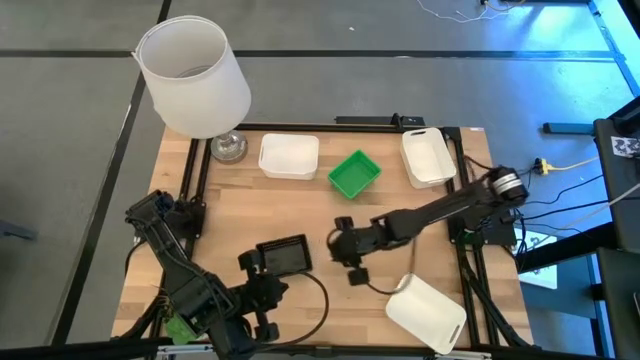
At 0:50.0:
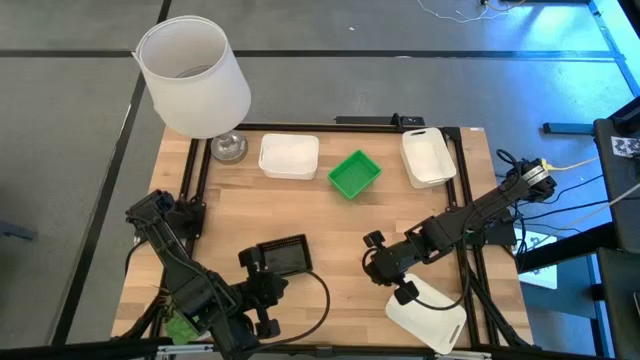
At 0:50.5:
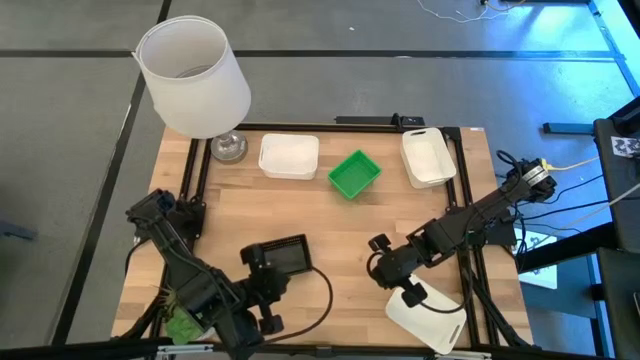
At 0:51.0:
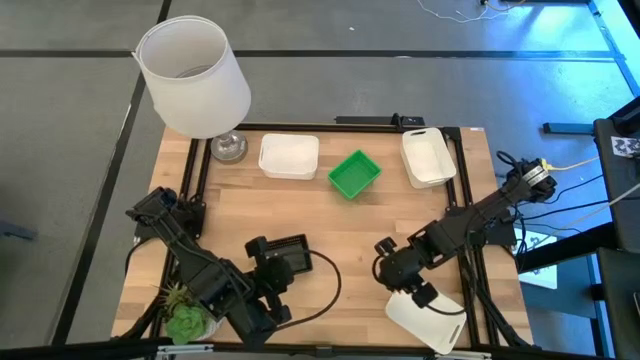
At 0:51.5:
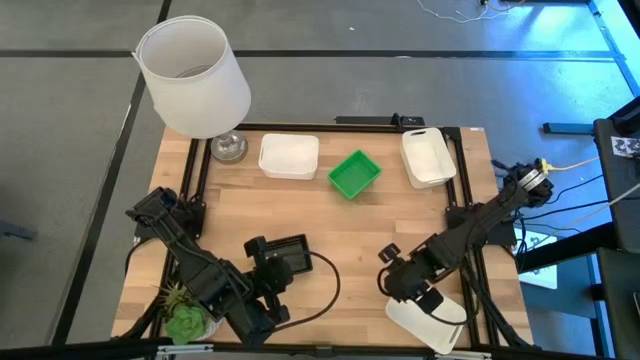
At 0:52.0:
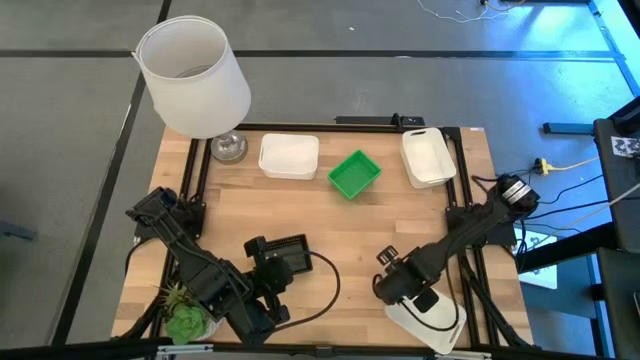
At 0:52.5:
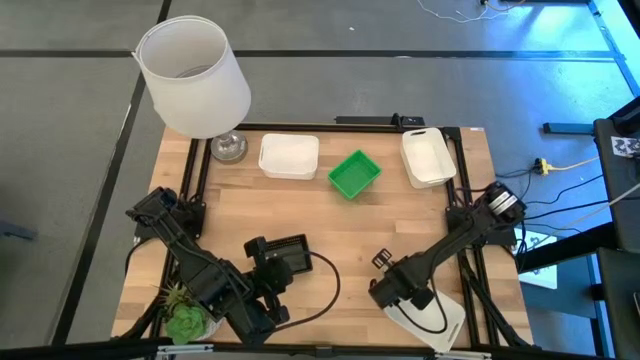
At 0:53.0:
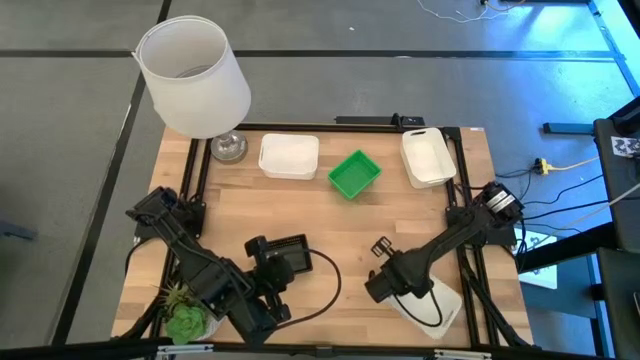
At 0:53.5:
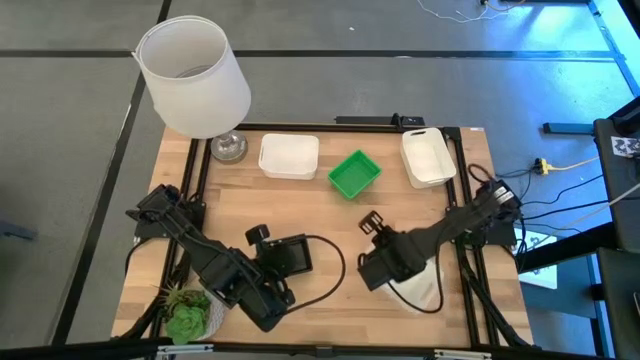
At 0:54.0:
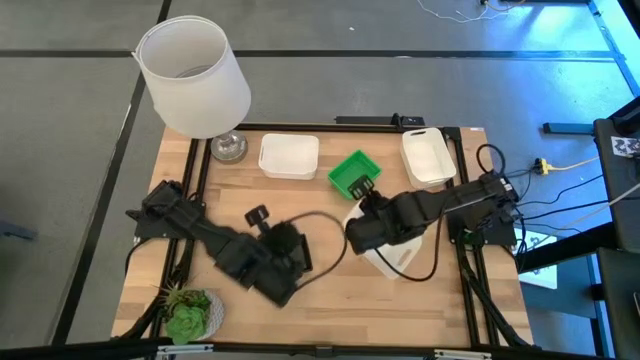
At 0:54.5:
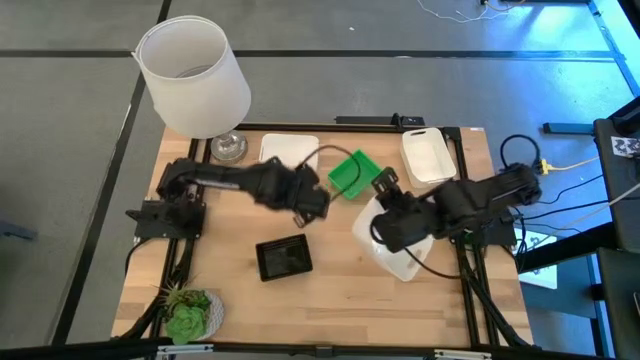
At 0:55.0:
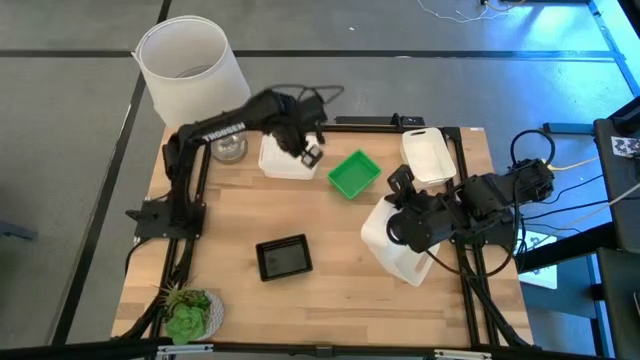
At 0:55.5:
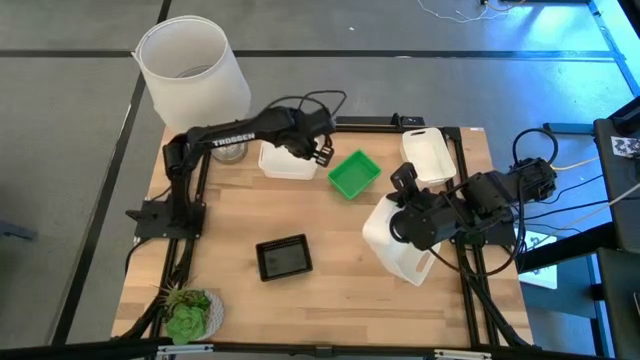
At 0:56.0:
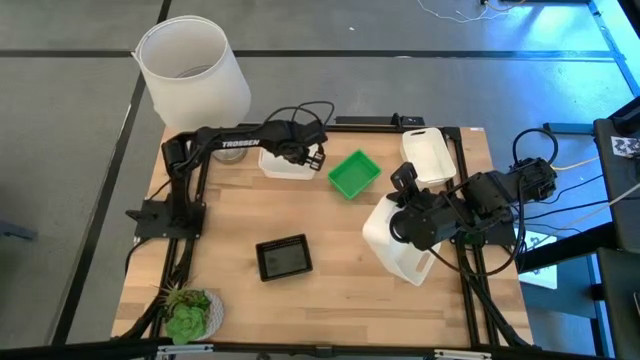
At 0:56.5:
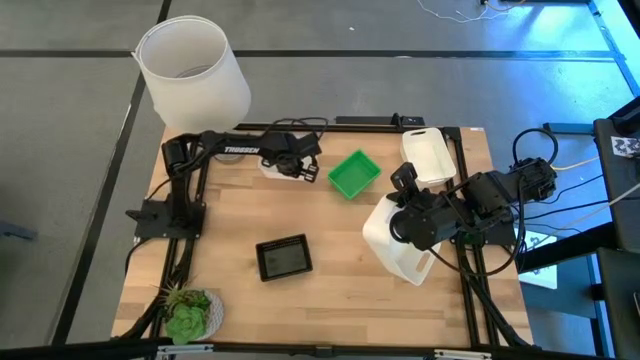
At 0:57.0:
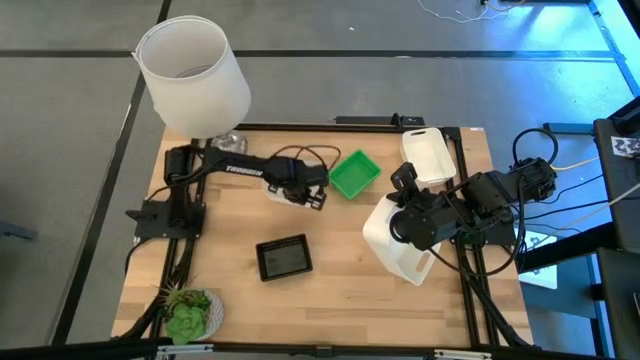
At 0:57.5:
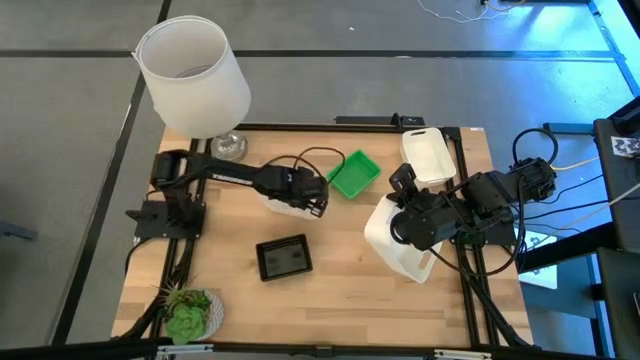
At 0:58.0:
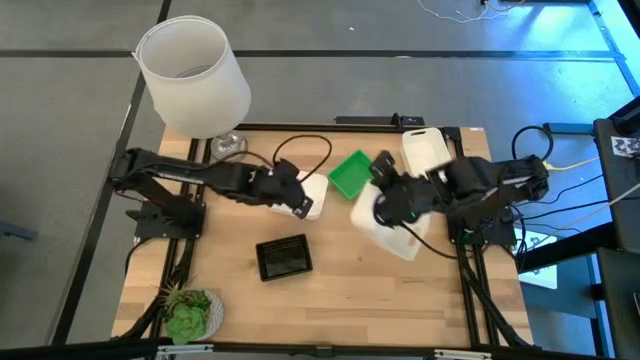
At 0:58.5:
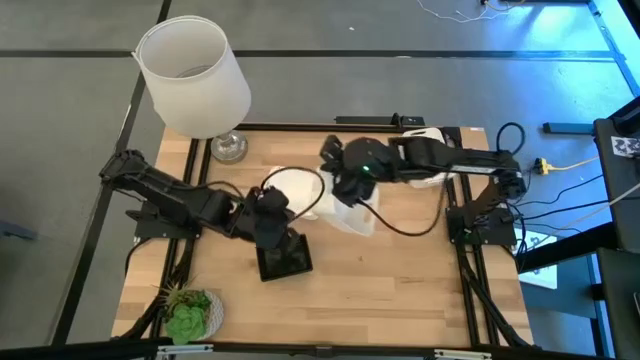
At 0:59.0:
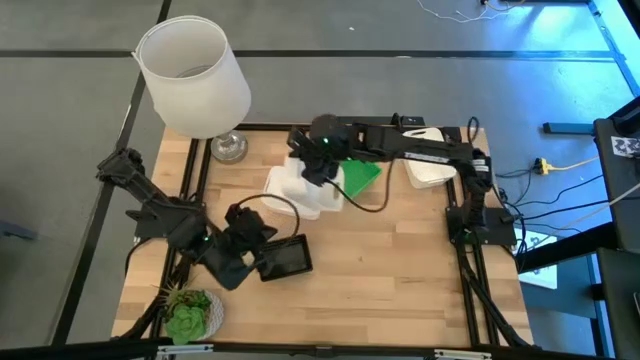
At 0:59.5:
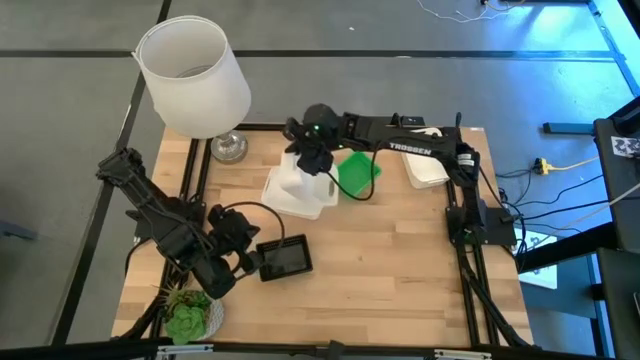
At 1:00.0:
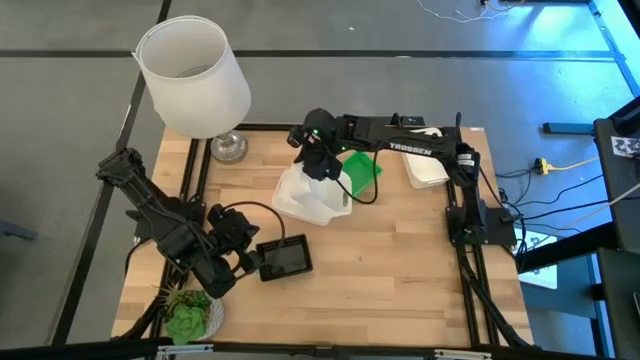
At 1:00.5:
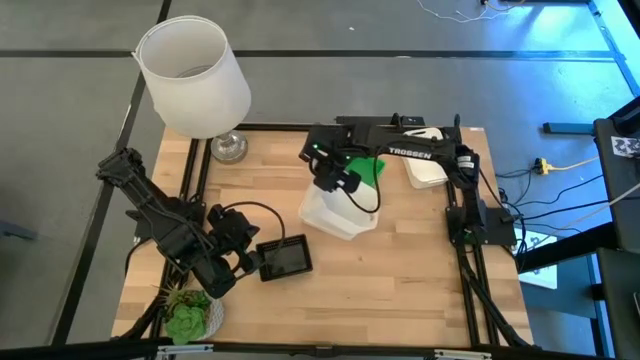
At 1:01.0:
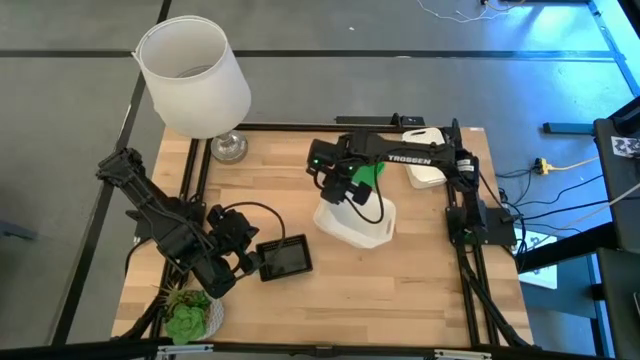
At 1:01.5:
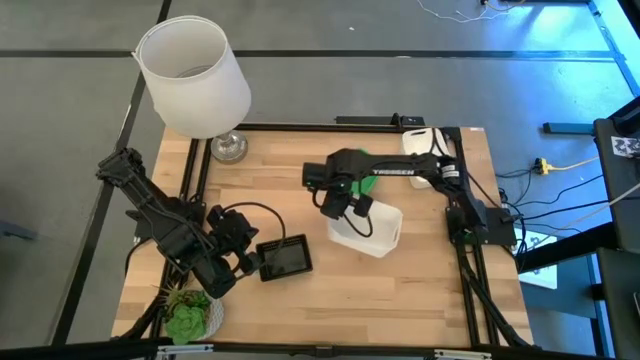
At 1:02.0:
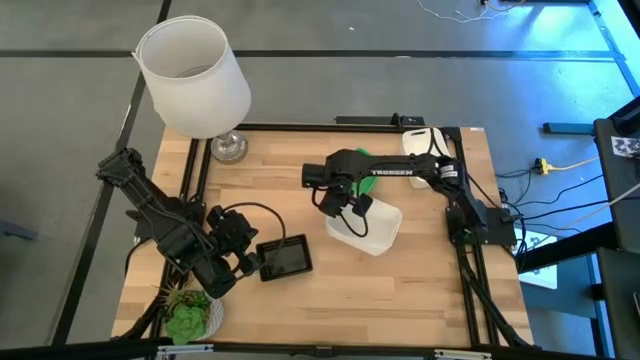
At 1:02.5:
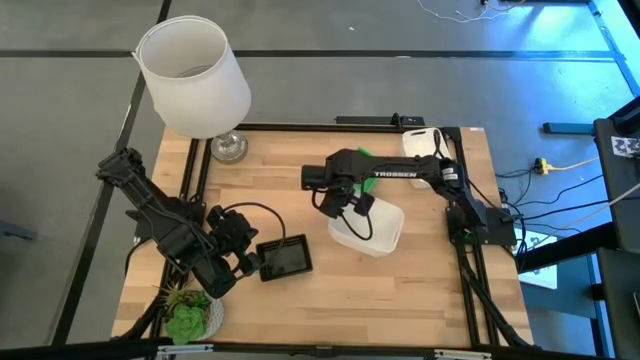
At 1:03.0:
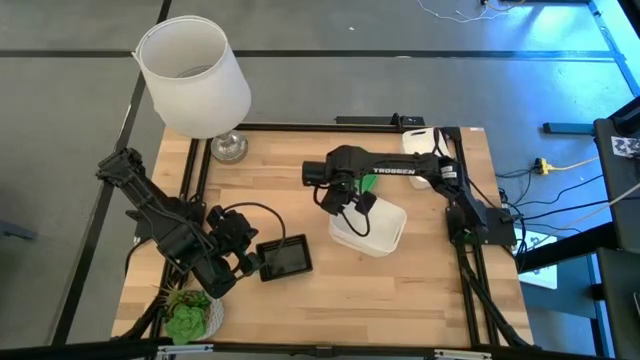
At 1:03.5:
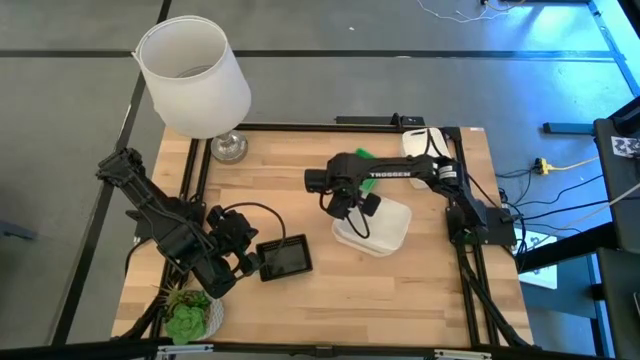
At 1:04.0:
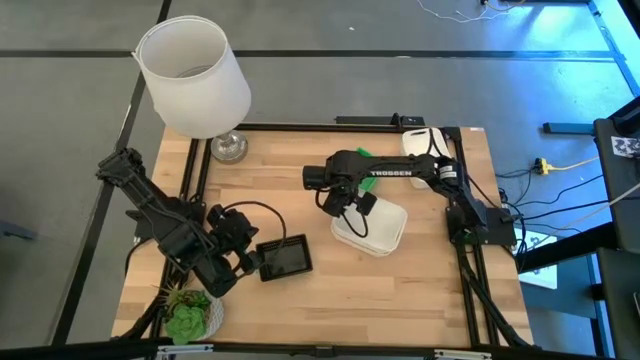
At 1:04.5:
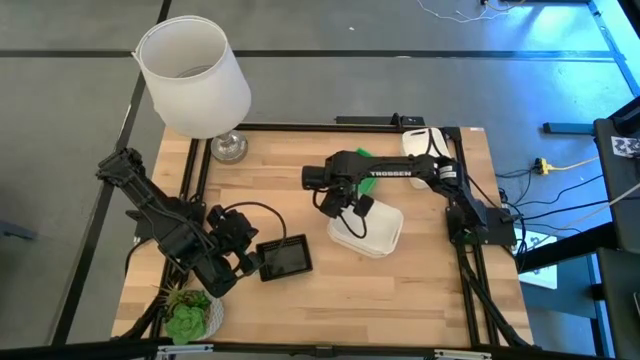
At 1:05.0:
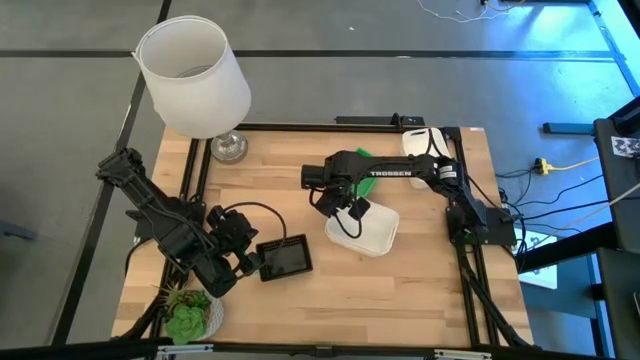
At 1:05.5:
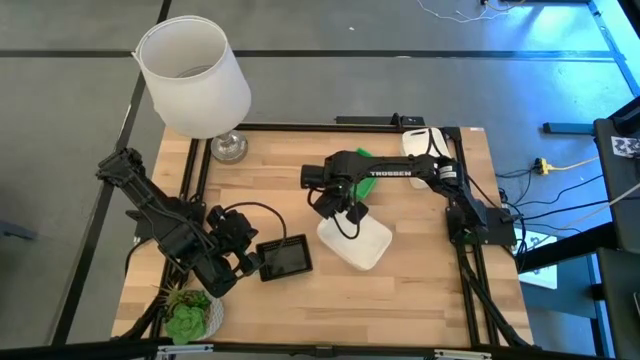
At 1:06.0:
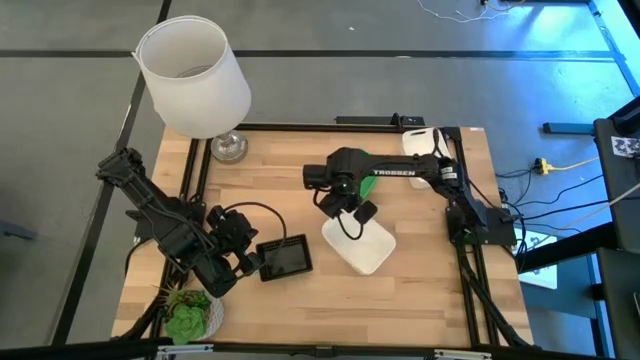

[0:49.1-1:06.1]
Stack the bottom right white bin on the top left white bin

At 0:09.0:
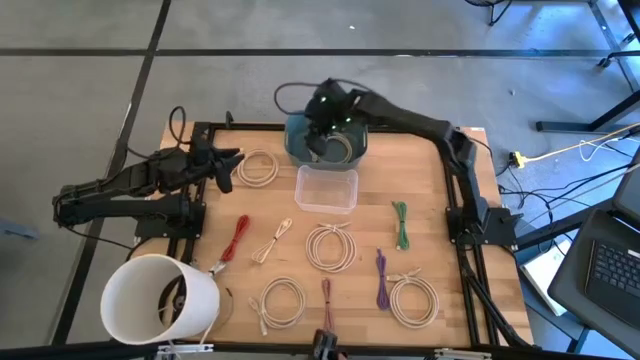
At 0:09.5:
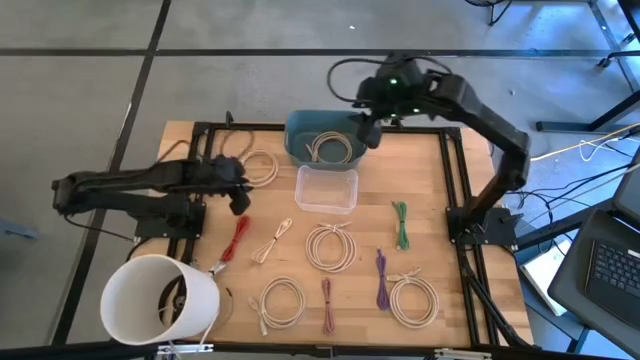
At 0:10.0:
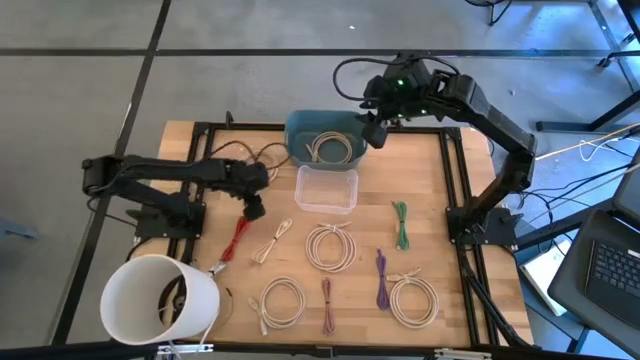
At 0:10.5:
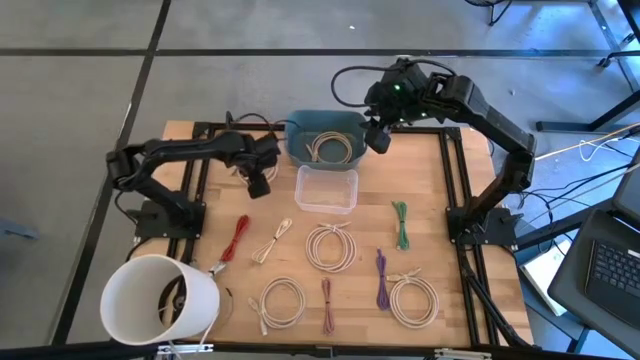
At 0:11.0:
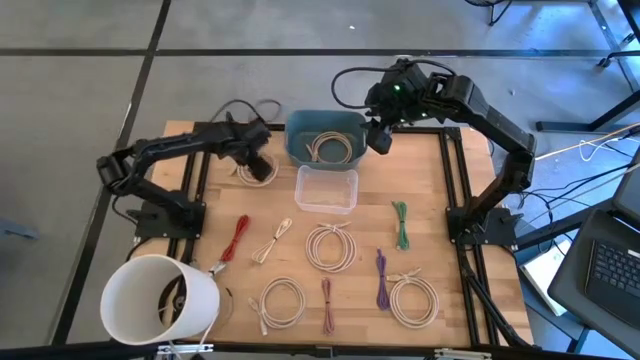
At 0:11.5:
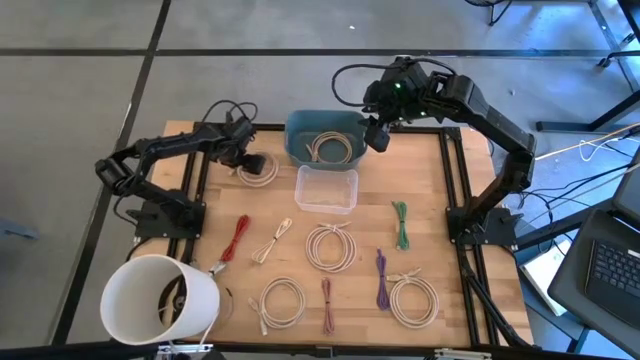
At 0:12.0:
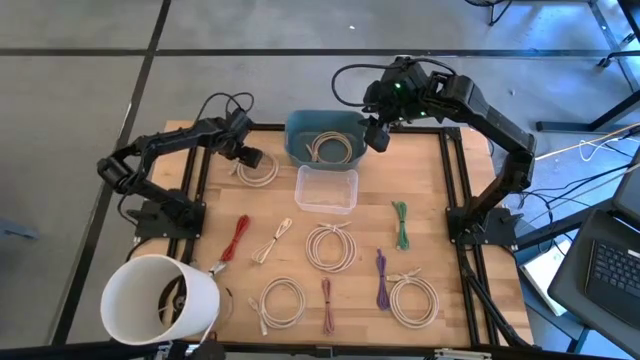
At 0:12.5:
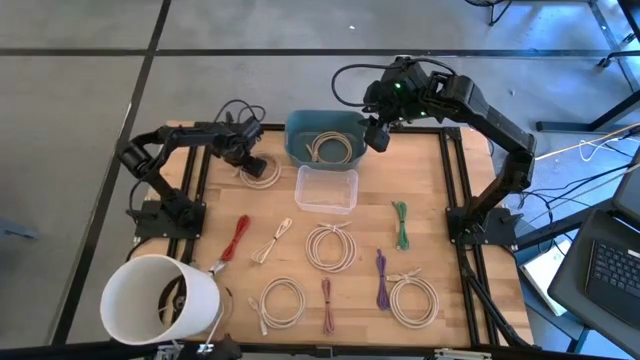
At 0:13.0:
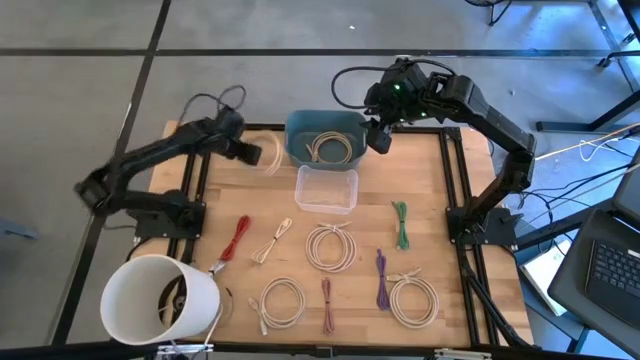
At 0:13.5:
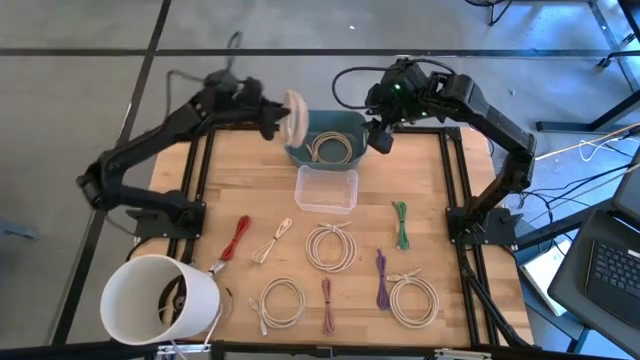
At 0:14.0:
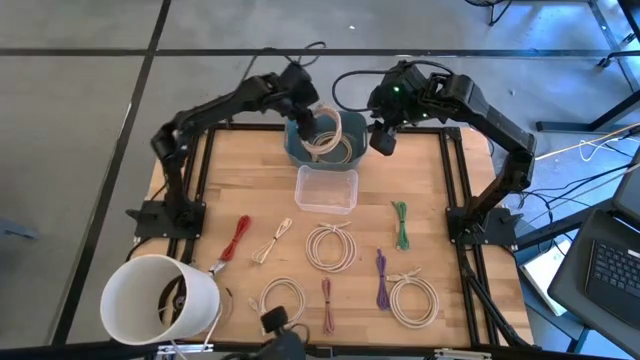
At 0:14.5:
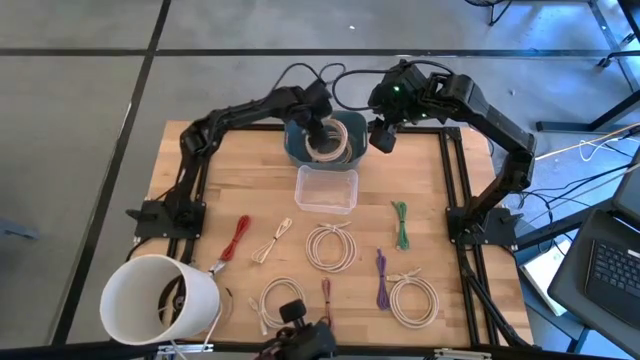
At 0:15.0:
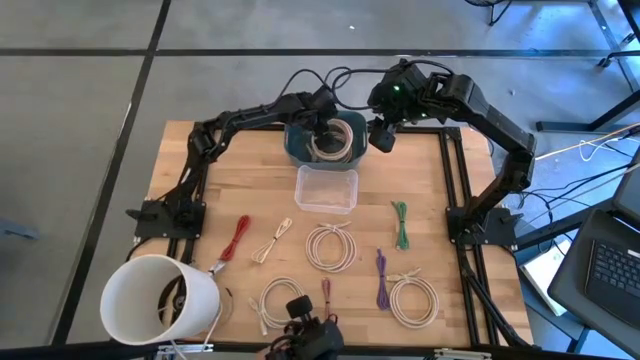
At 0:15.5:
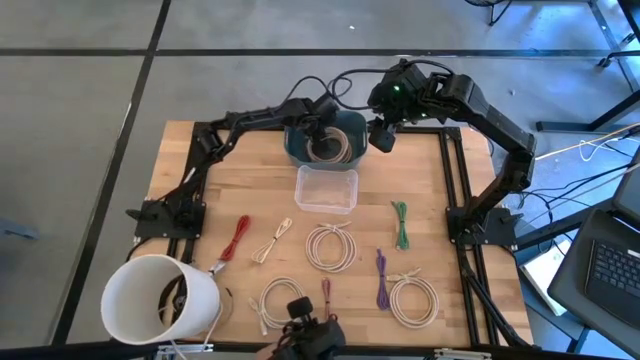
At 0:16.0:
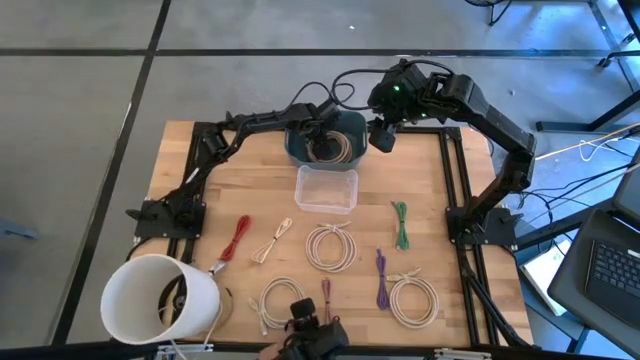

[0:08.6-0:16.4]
Put the brown HDMI cable into the blue bin
